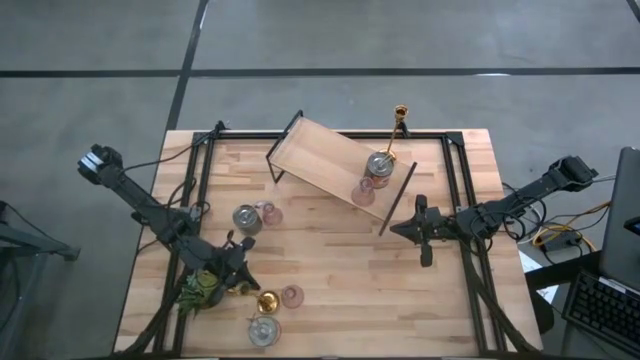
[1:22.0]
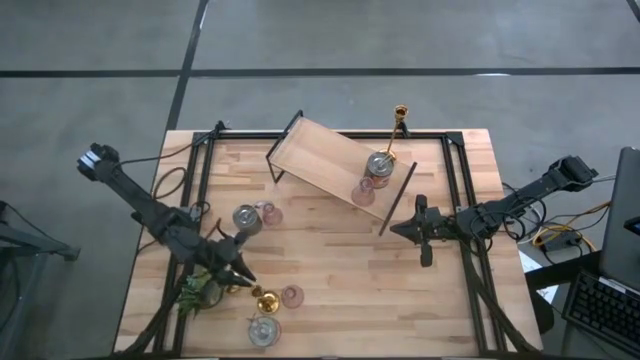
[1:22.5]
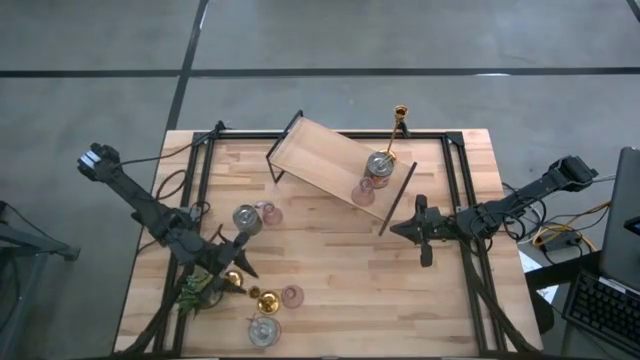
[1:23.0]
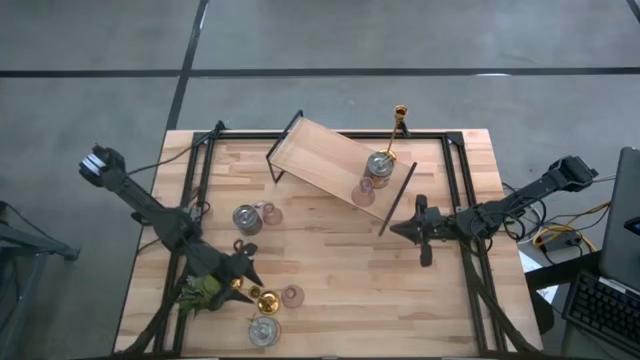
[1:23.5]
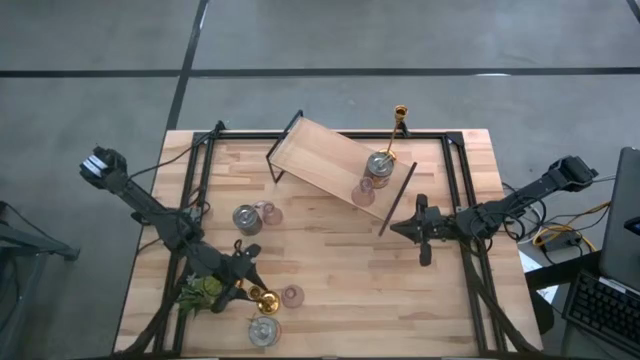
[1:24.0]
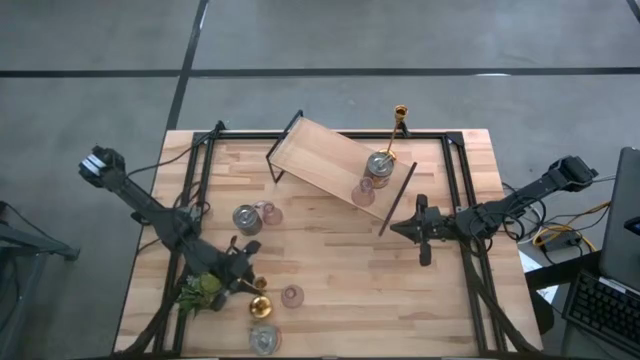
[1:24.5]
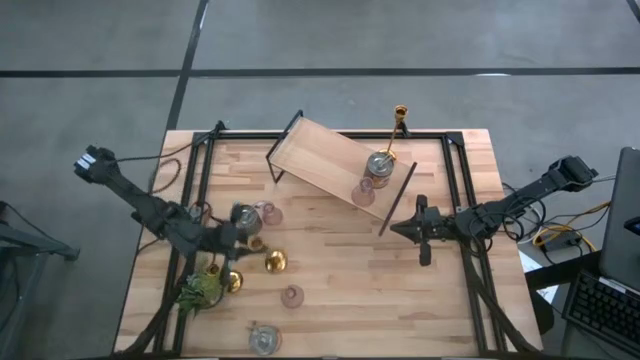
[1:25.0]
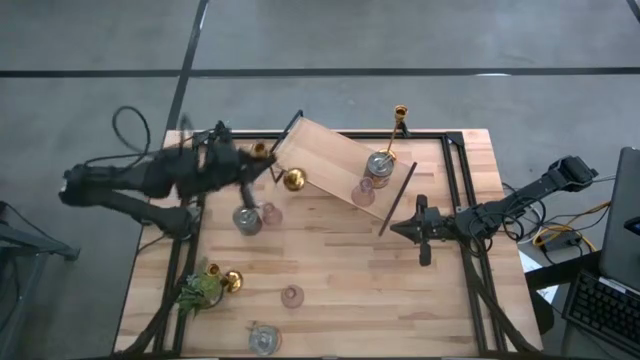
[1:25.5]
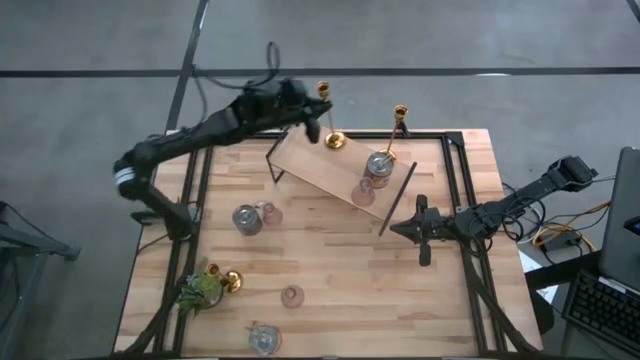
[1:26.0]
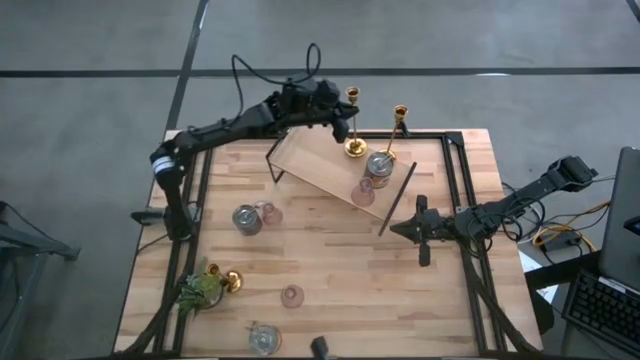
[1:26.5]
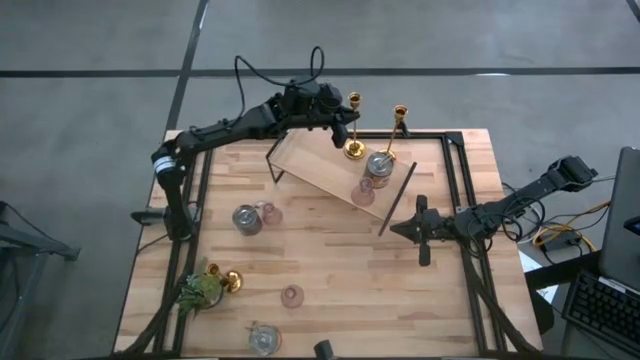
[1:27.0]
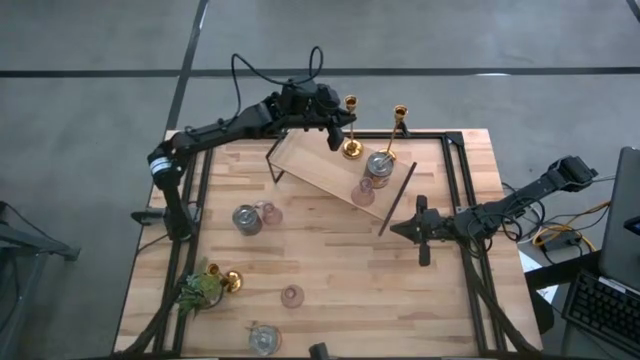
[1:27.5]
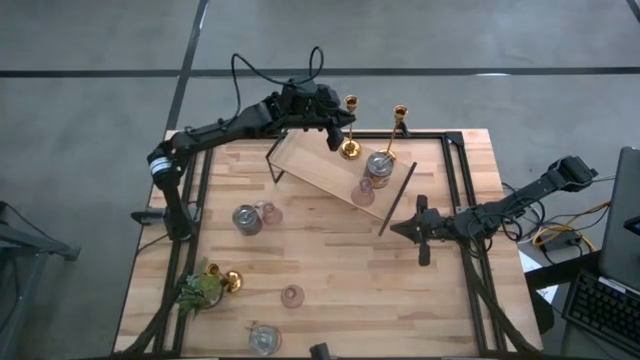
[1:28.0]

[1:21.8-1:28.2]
Task: Pick & Place candle stick holders
Put the right gold candle holder on the shelf aligned with the other gold candle holder

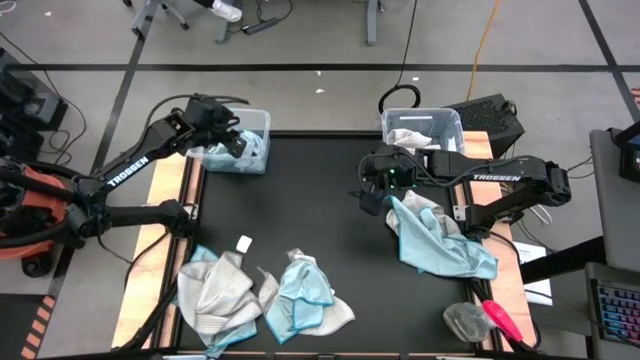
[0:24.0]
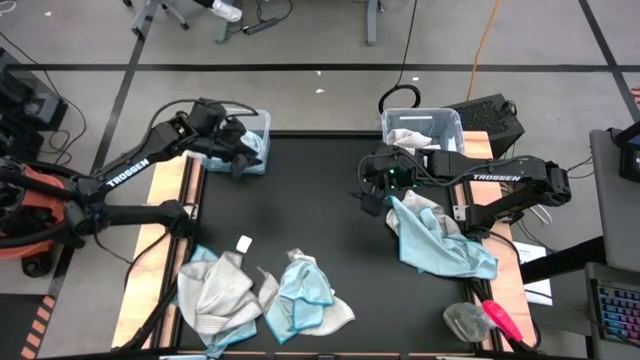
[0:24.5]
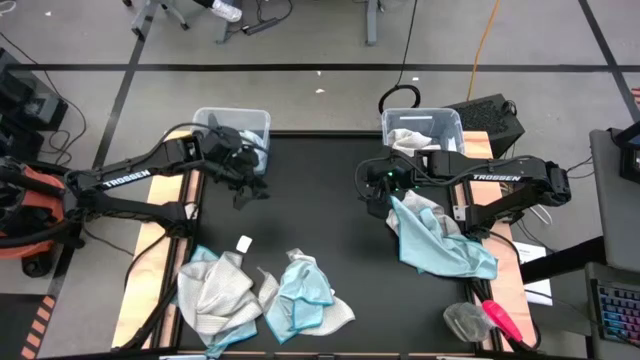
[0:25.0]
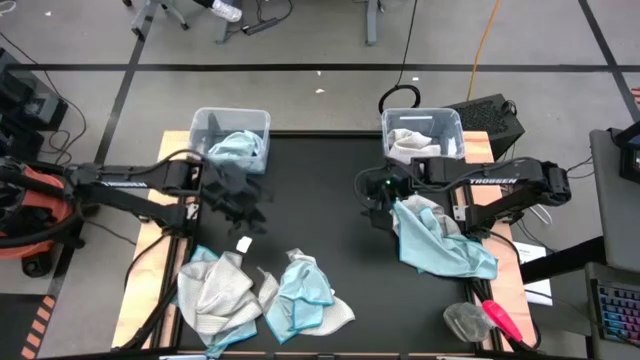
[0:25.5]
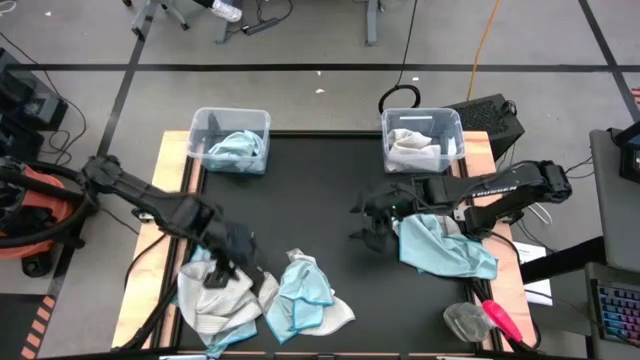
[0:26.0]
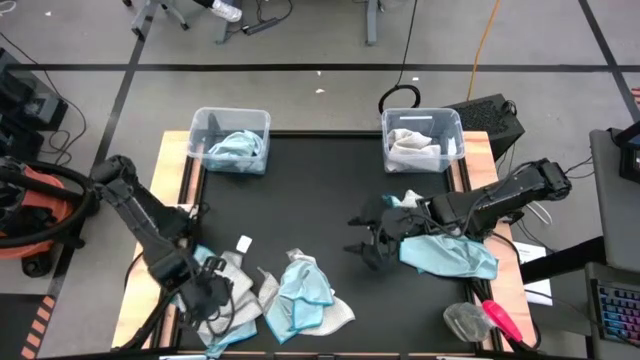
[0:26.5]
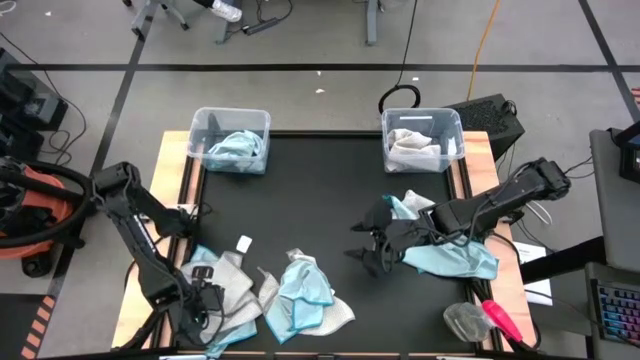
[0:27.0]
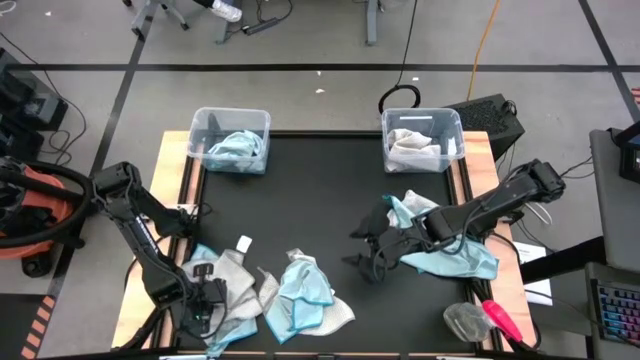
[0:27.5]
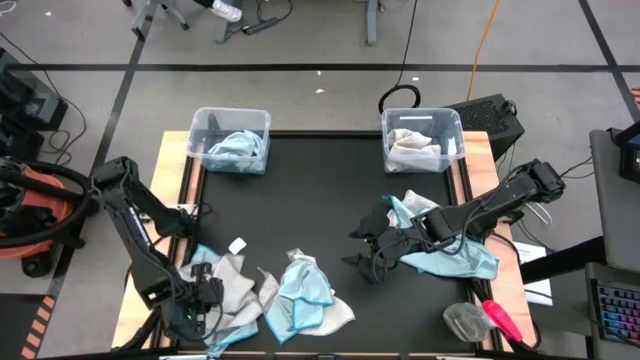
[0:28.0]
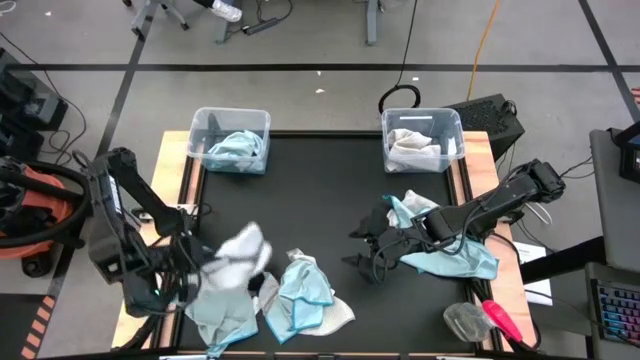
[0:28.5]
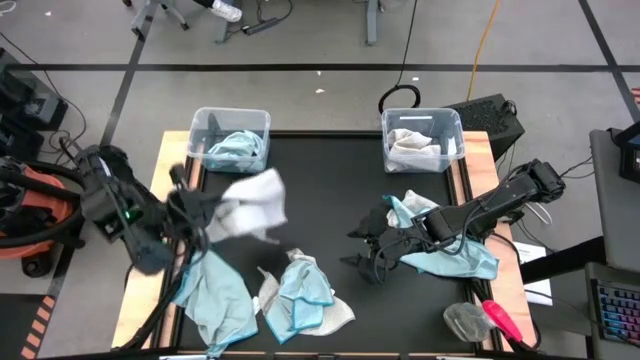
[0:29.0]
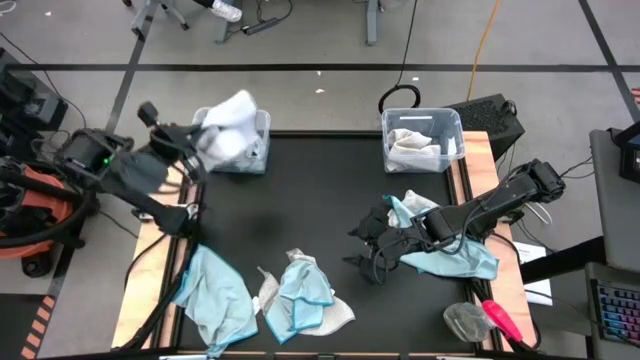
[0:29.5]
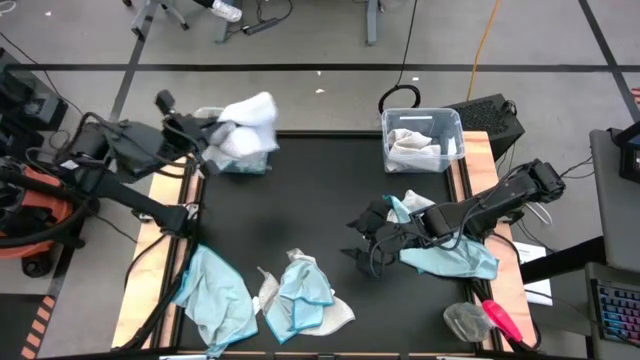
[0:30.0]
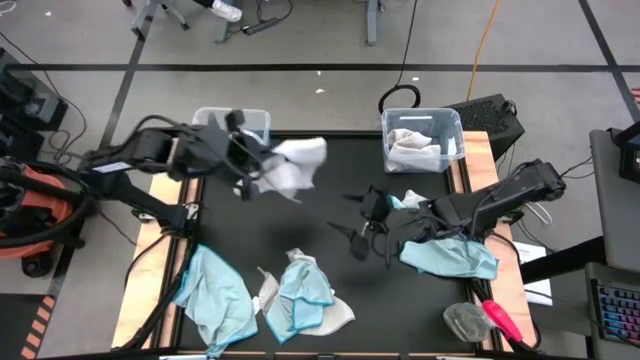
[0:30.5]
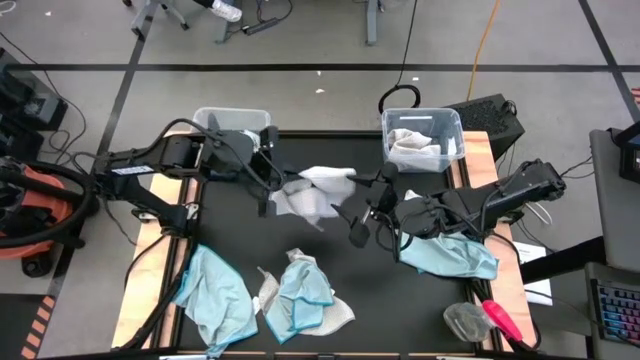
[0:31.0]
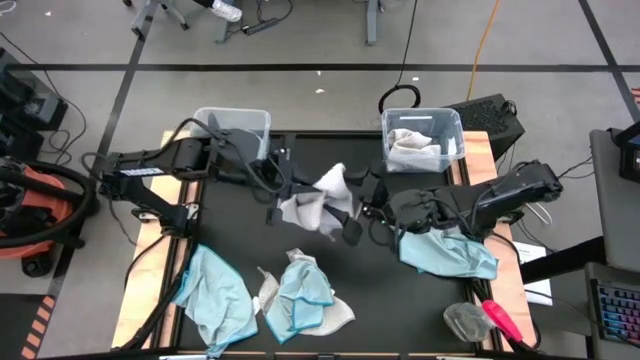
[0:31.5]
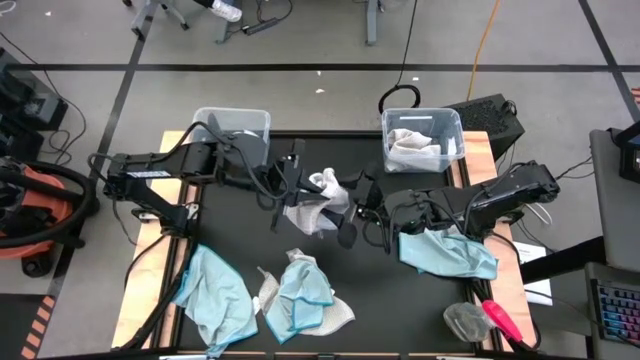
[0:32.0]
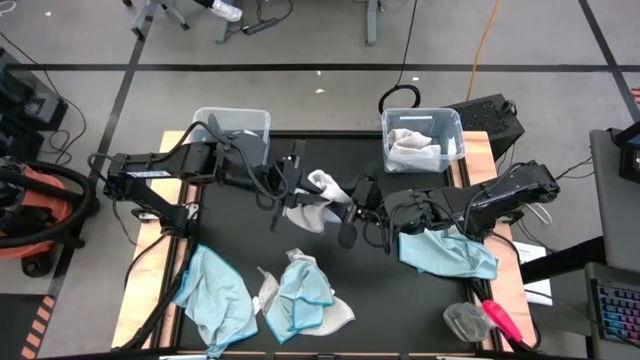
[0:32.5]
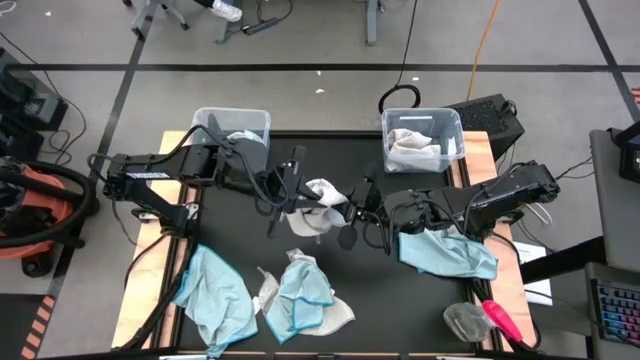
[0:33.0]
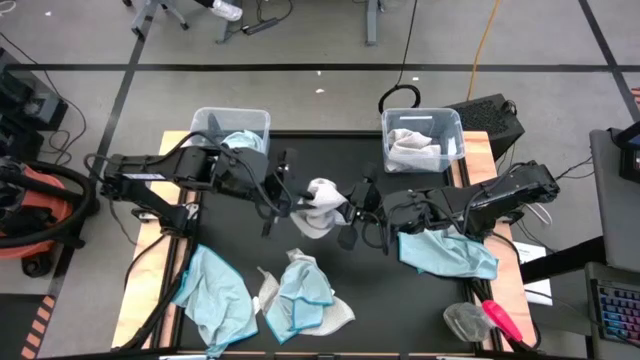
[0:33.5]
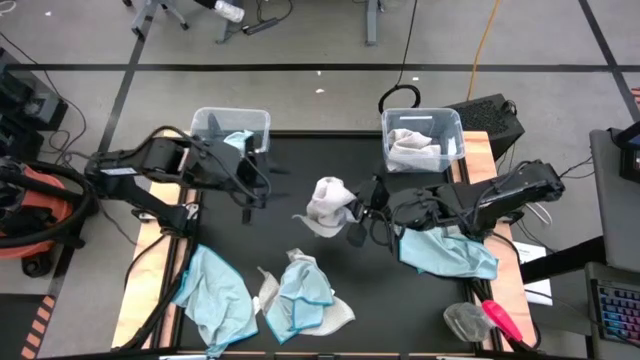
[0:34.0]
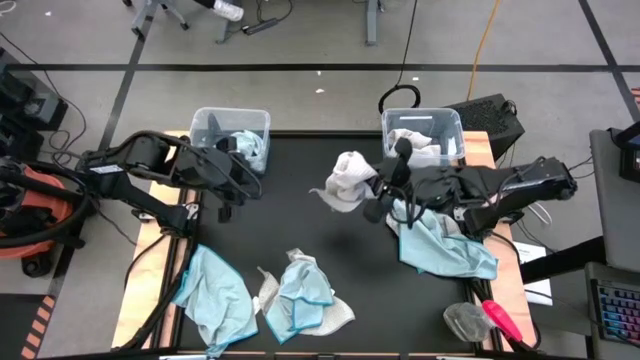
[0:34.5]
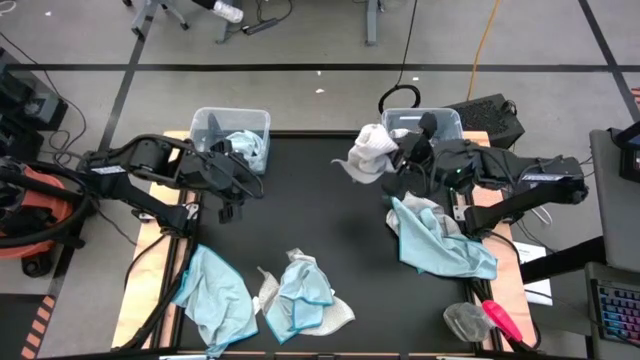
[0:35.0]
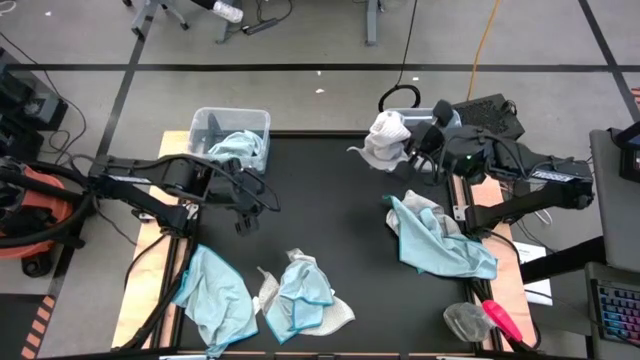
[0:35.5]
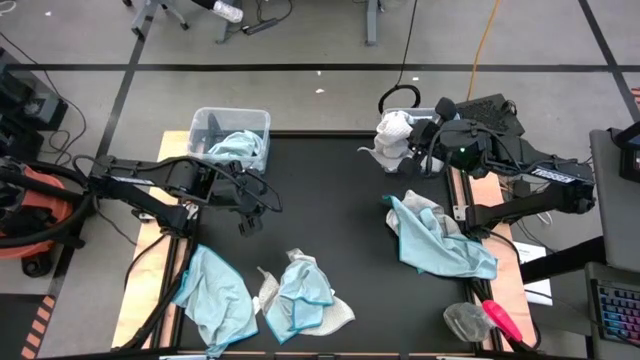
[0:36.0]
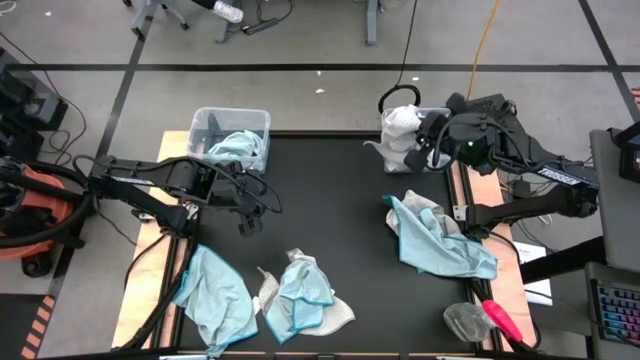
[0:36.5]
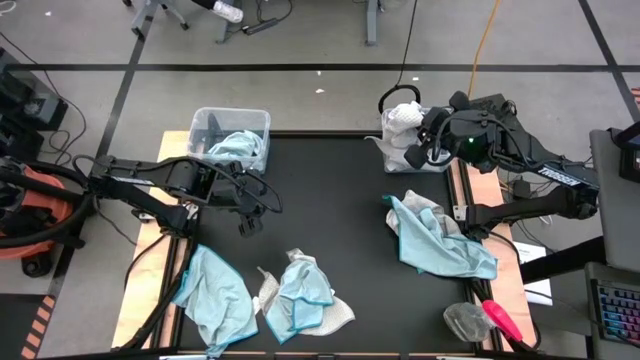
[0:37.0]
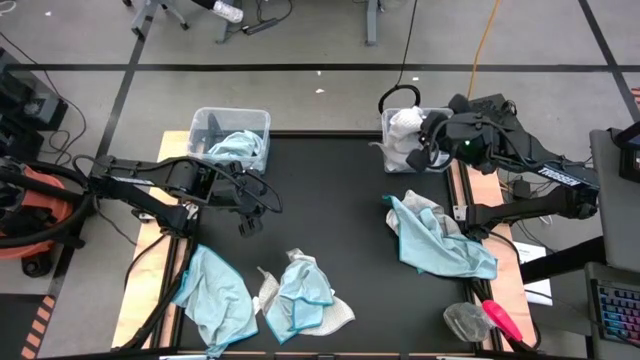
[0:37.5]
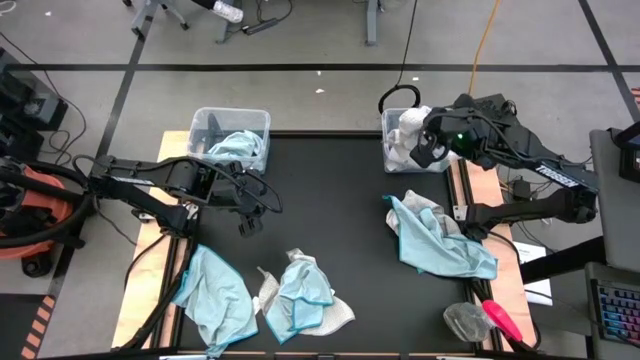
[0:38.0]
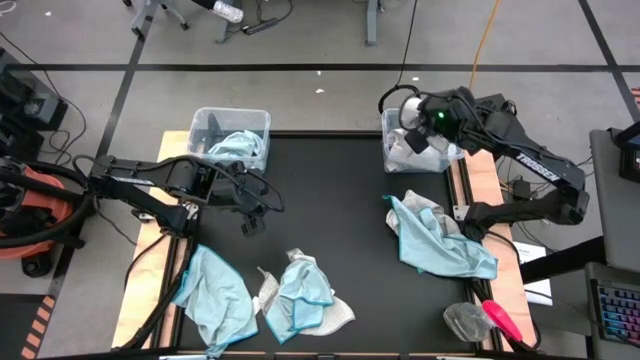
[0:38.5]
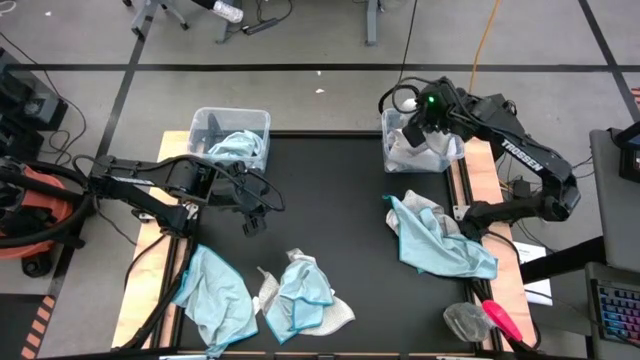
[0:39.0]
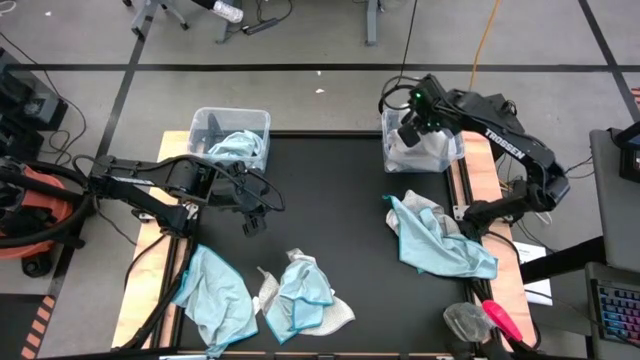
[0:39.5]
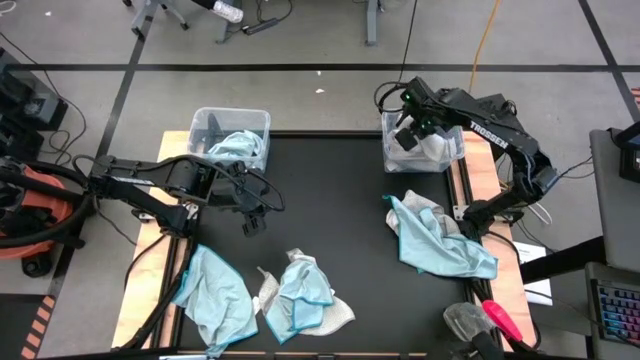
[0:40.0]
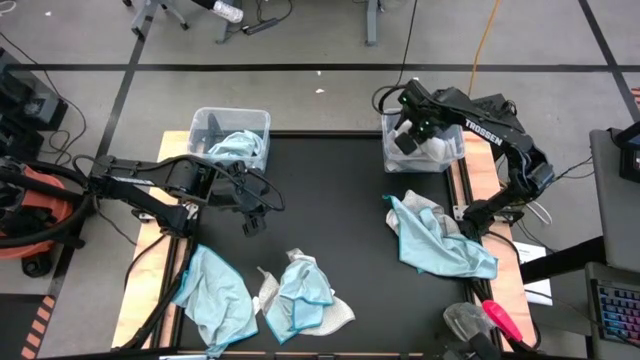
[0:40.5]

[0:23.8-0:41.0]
Task: Sort microfiber towel by color & place in baskets
Put the gray towel into the right transparent bin
